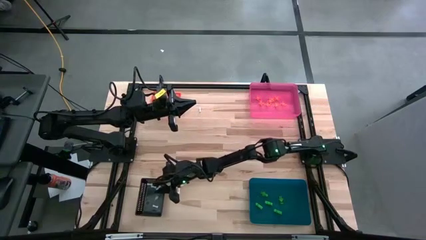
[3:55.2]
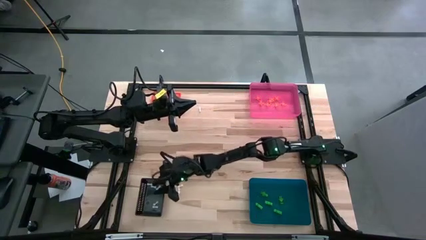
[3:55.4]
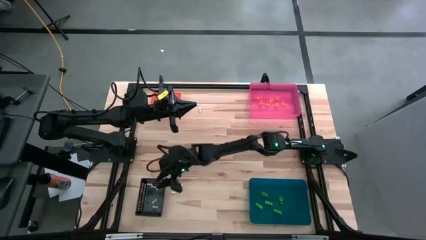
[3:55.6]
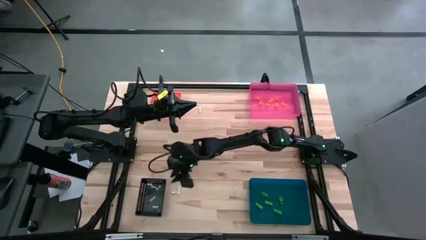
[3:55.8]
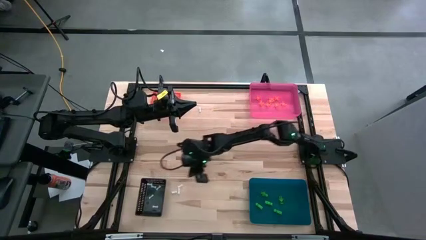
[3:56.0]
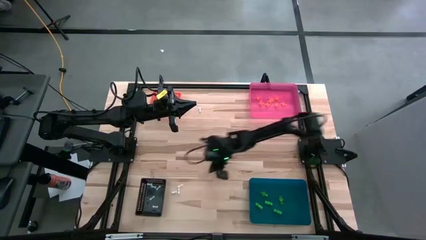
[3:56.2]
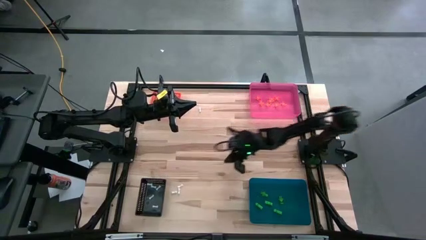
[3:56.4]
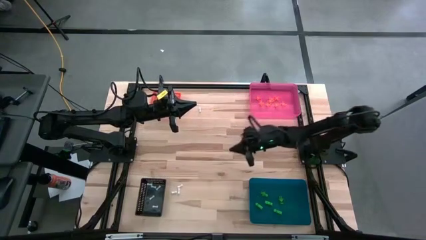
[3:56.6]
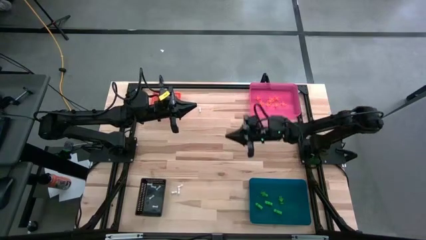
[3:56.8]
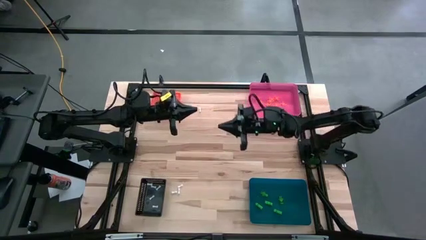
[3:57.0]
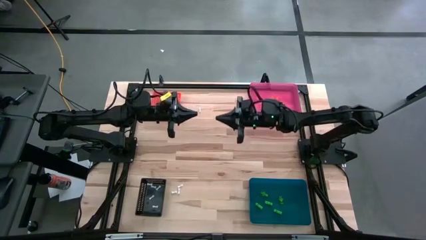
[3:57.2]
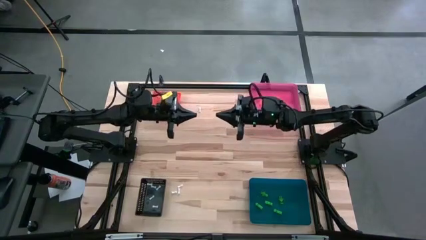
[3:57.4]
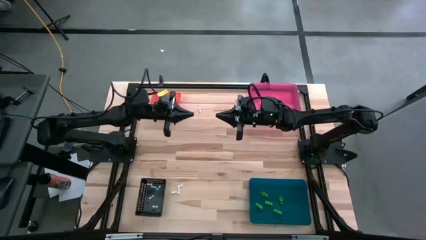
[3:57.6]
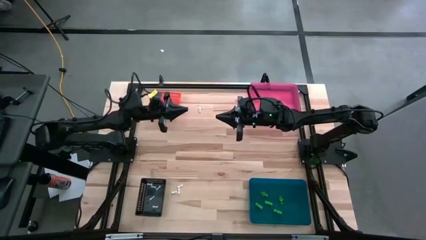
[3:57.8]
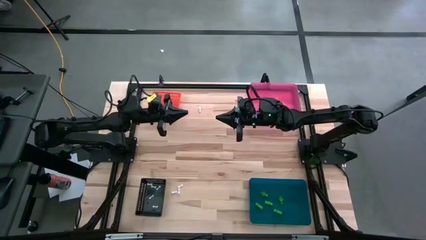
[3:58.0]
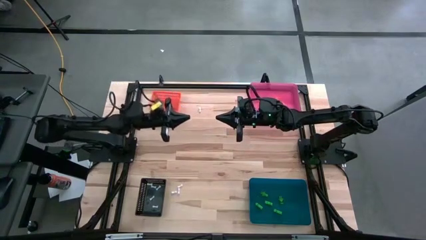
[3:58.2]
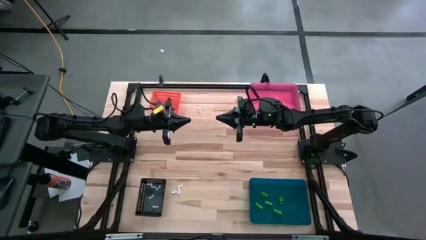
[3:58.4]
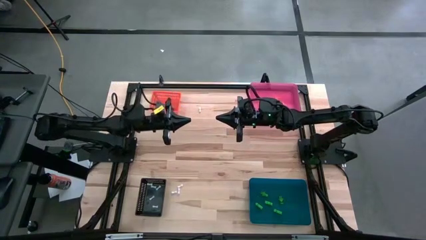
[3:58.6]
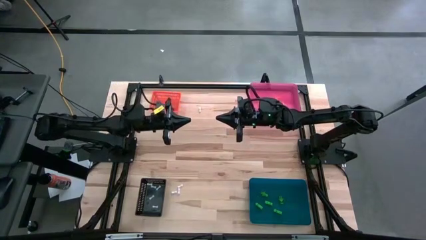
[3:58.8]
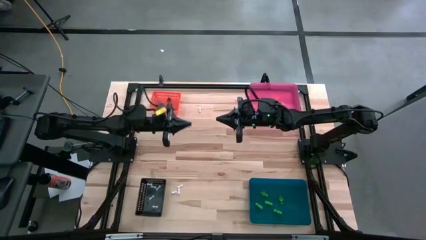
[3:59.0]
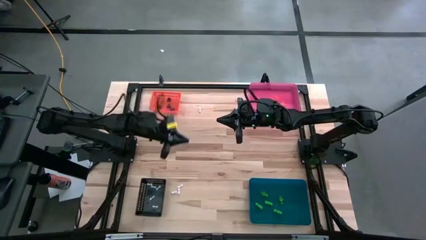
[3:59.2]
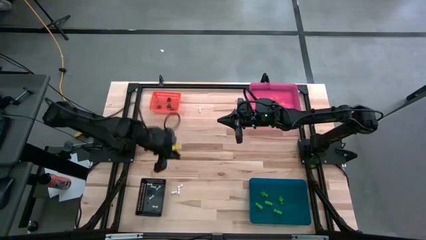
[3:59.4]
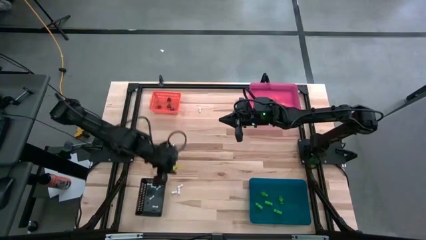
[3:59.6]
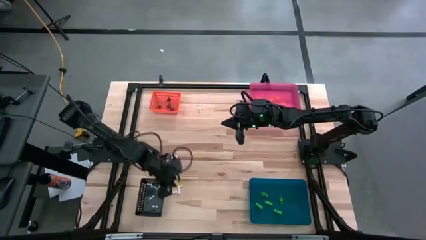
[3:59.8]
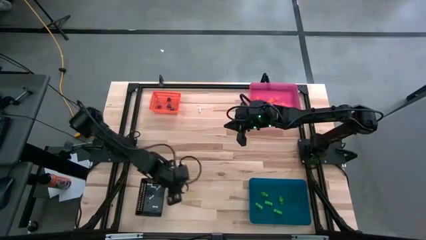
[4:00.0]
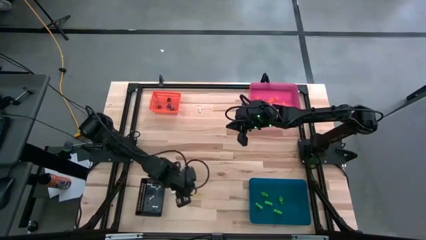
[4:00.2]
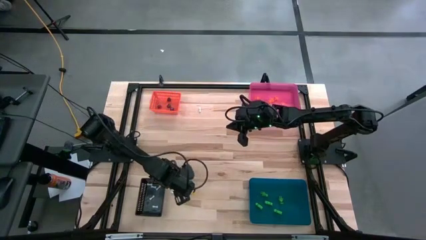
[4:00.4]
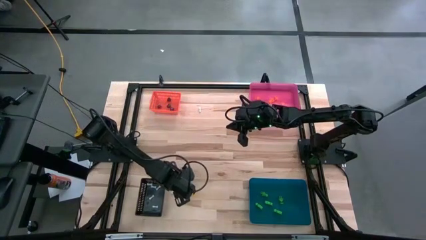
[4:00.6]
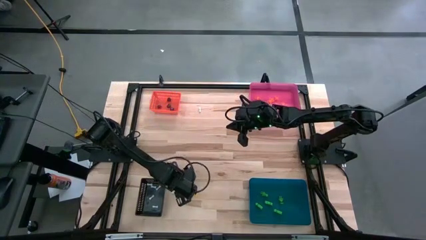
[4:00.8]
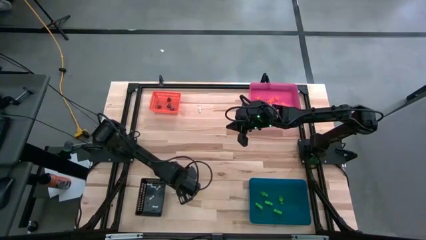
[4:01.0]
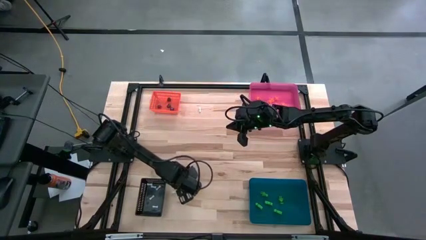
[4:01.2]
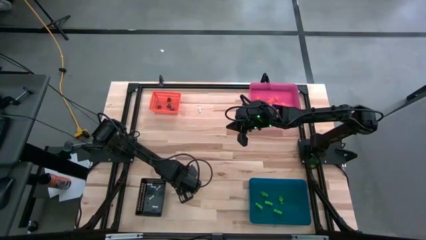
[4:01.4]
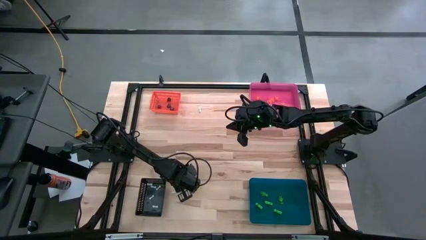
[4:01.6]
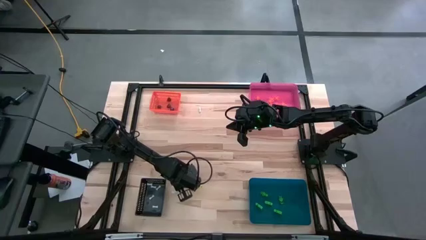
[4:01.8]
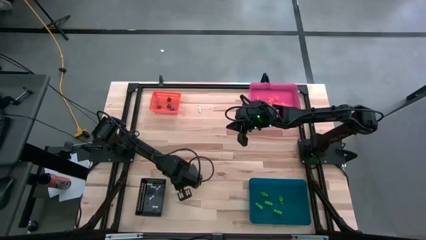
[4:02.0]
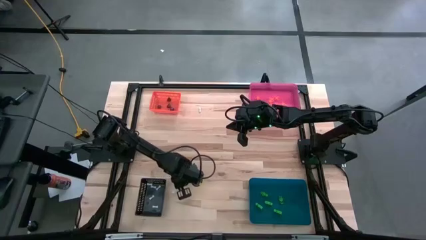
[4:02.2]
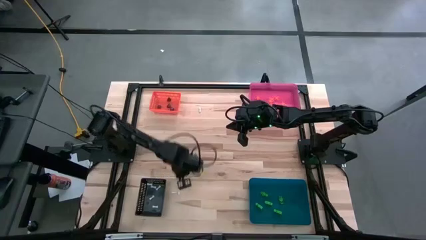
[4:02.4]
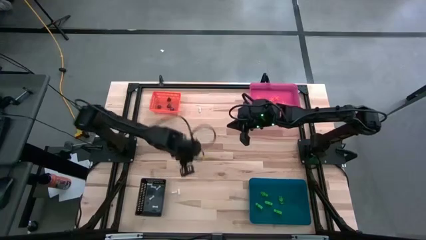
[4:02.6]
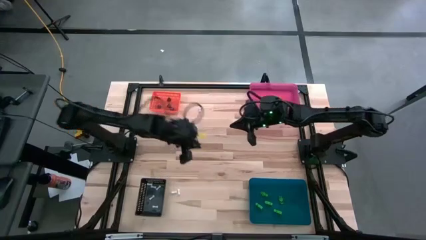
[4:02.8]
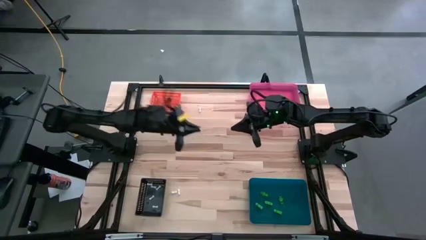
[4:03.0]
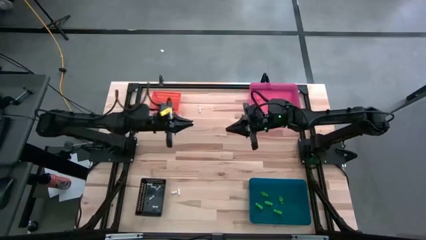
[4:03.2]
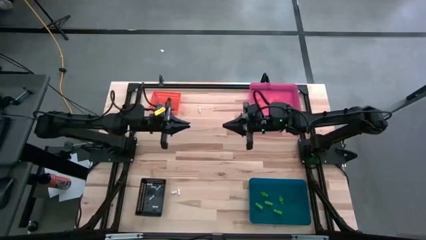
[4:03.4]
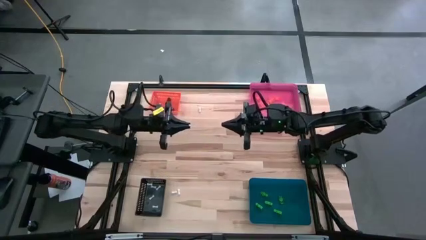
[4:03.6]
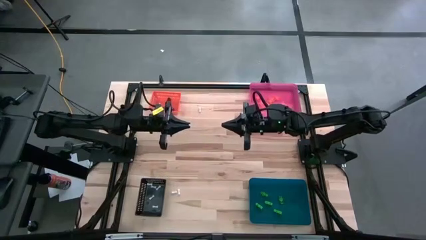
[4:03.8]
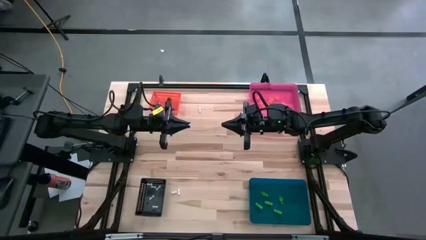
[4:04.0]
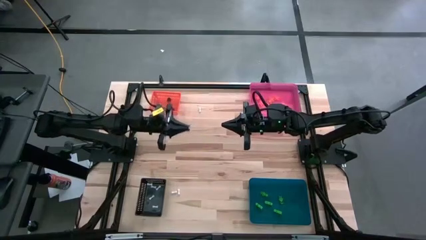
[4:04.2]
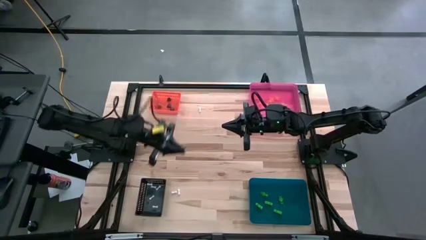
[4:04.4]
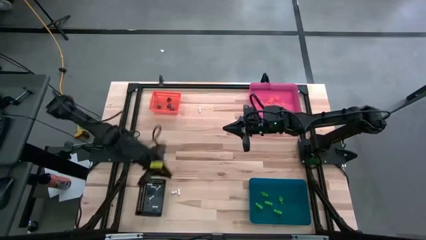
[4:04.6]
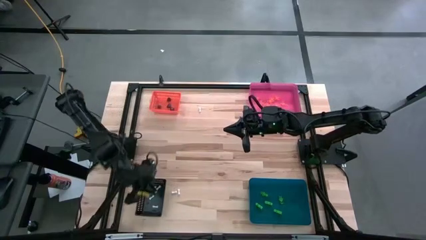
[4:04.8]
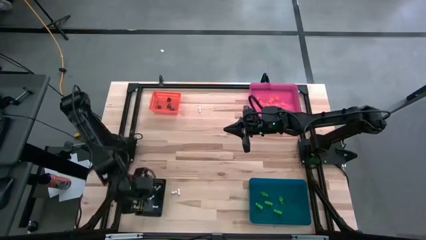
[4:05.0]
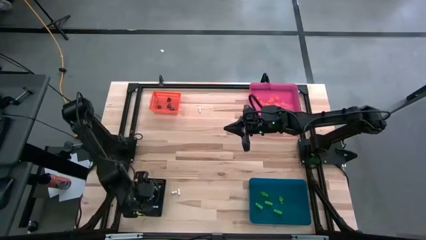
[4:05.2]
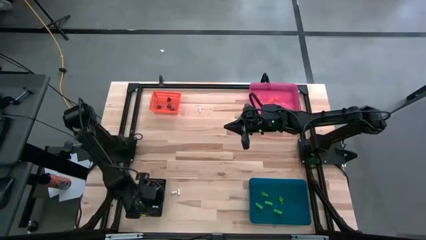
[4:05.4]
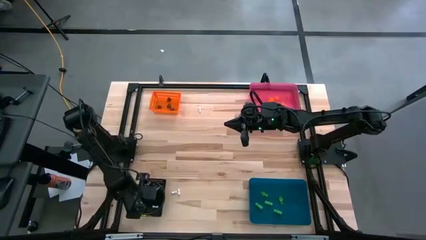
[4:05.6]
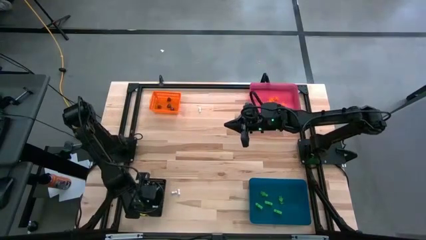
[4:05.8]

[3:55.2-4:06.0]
Task: Sort Halloween decoration
Put the white bone toy into the black bin

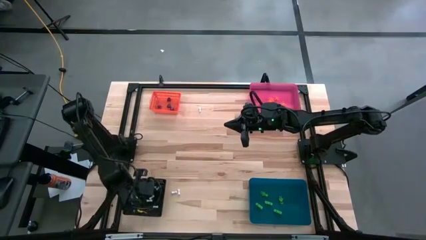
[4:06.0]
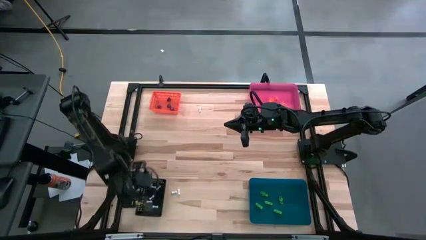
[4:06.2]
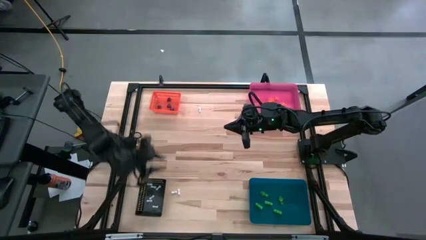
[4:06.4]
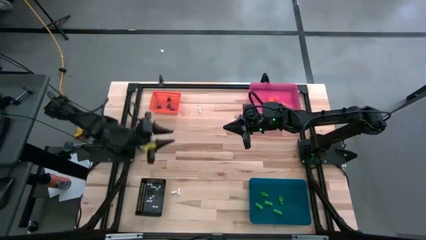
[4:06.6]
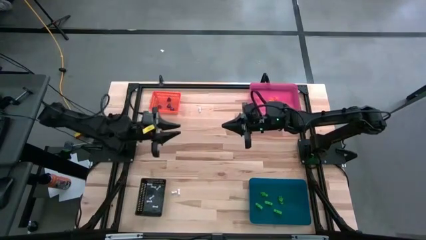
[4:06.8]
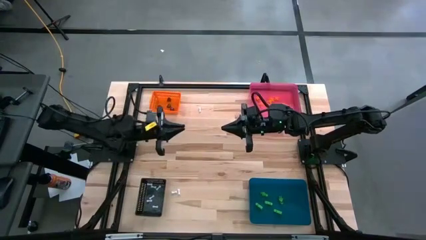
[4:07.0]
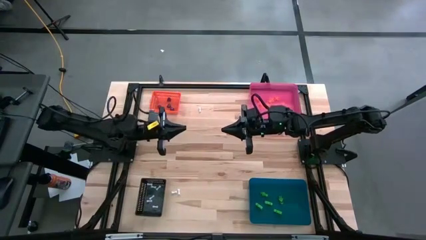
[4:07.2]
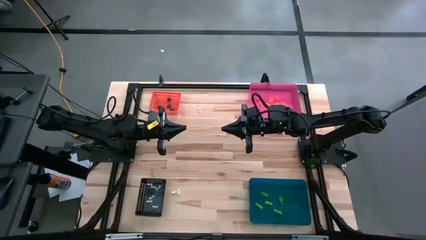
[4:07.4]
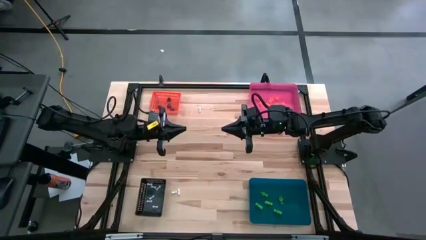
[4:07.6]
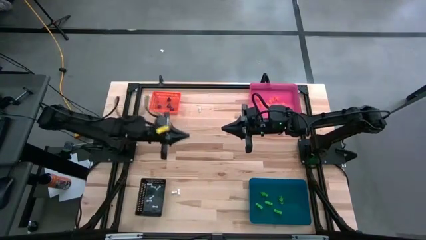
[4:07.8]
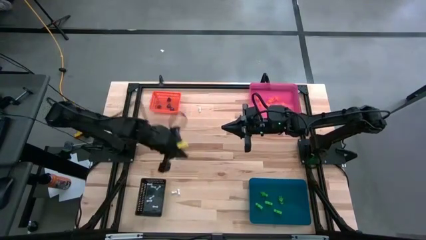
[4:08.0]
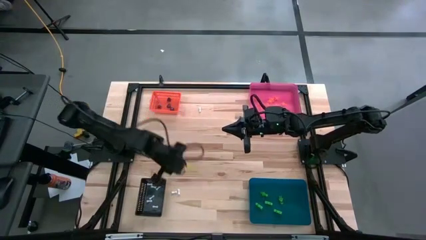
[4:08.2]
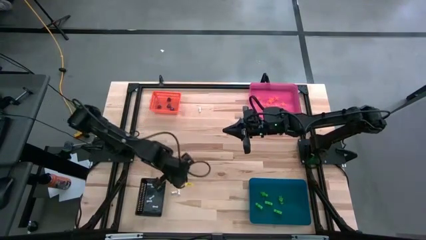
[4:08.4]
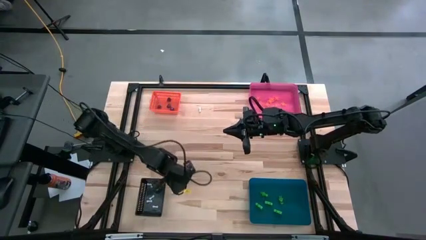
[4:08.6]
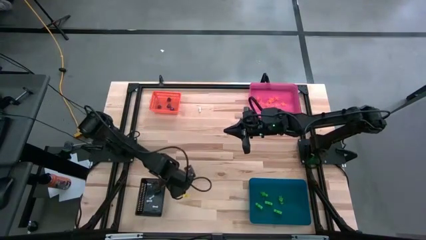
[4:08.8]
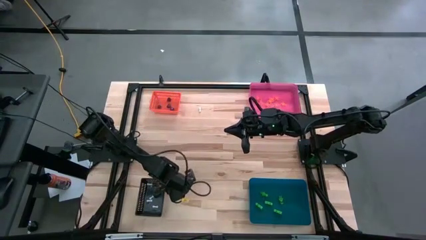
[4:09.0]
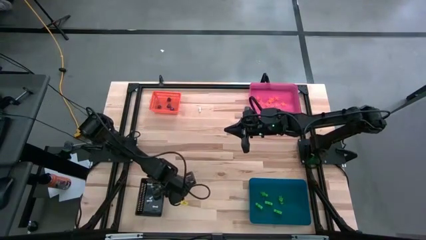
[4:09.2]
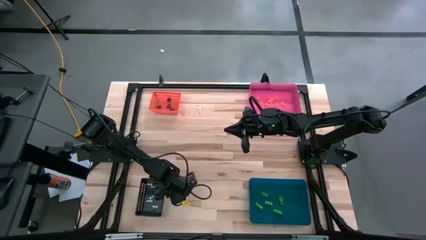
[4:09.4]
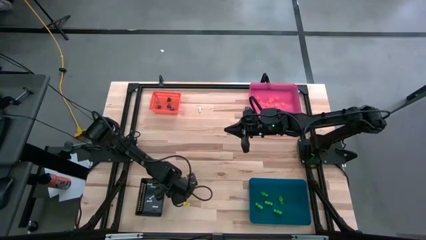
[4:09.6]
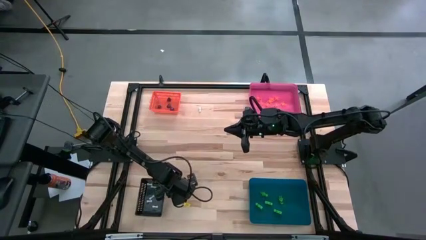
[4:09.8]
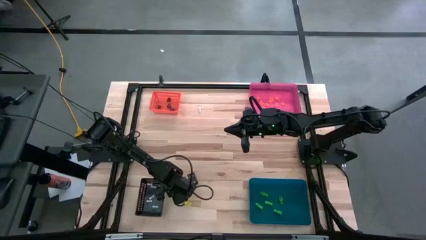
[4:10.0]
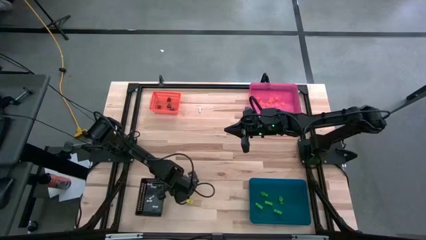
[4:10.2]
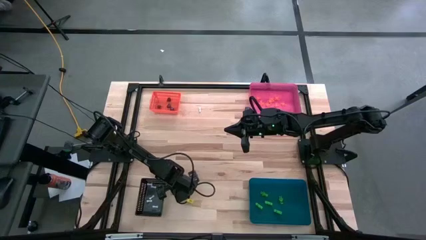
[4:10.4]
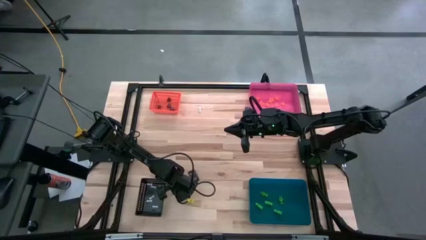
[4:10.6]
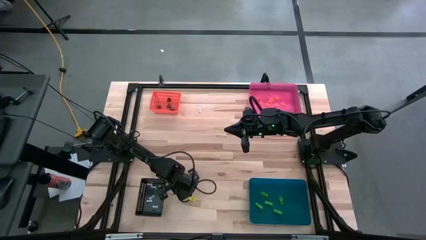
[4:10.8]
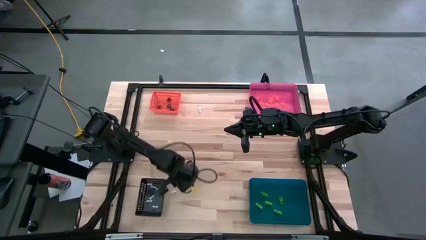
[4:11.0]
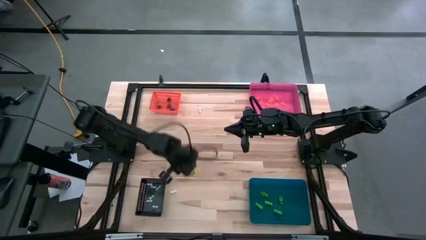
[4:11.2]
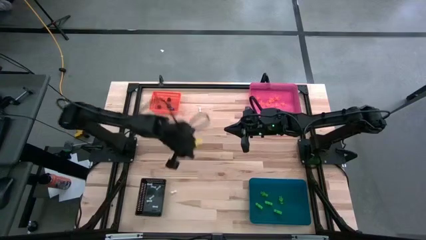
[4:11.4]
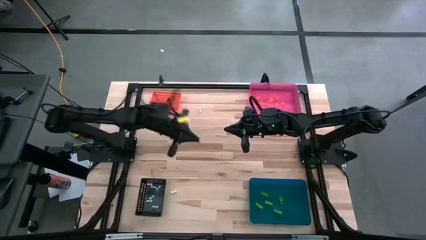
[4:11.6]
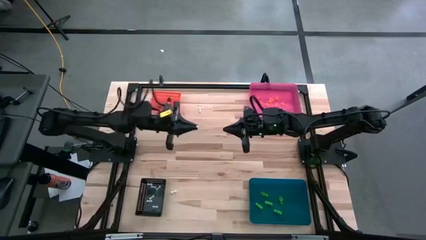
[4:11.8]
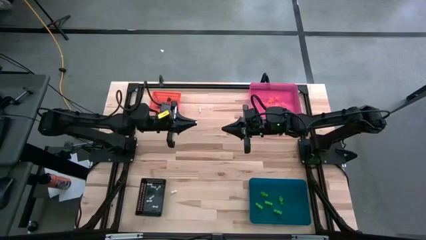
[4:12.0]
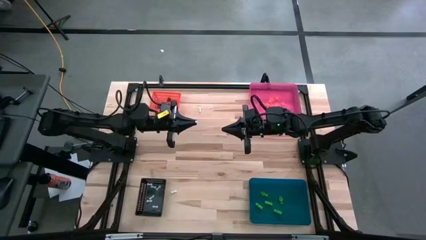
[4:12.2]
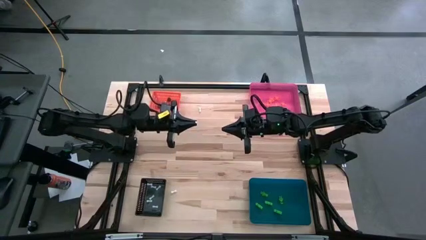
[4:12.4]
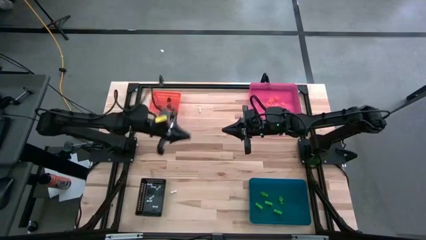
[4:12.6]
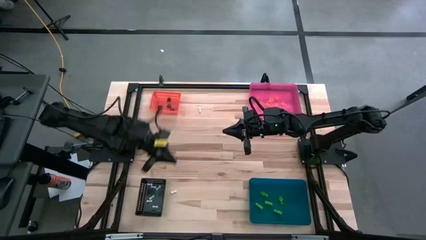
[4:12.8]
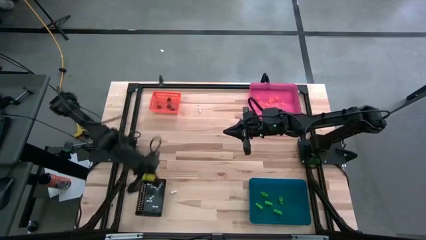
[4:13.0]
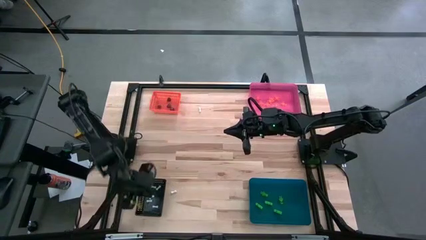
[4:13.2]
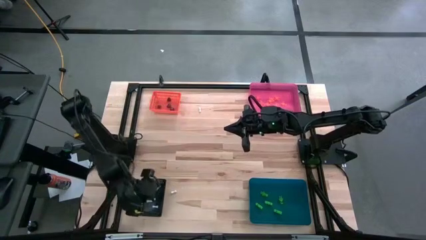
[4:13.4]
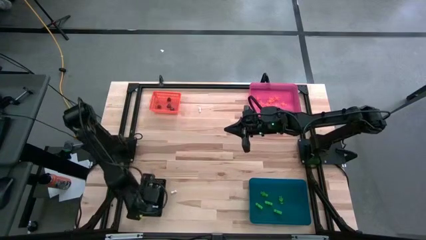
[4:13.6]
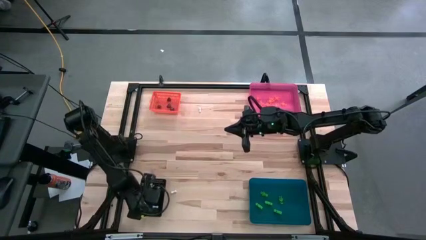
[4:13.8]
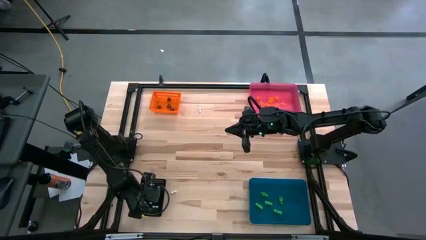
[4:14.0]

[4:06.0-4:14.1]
Put the bottom right white bone toy into the black bin
